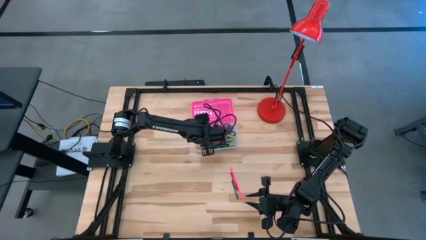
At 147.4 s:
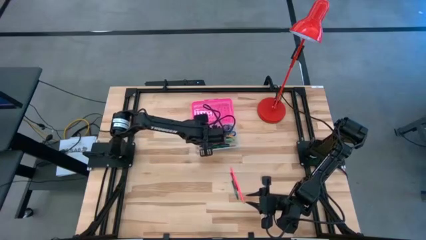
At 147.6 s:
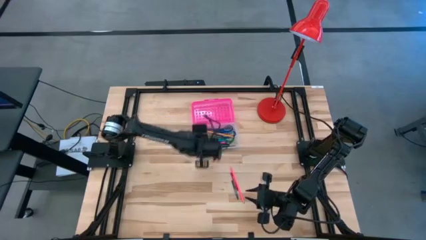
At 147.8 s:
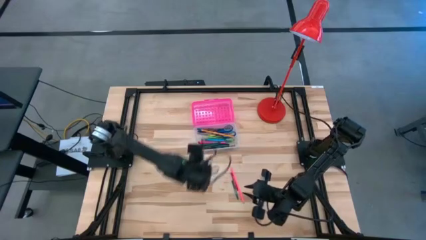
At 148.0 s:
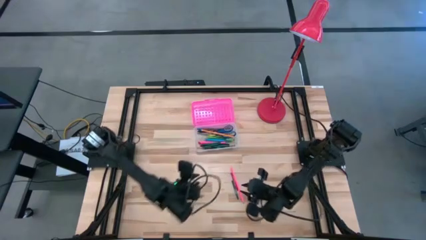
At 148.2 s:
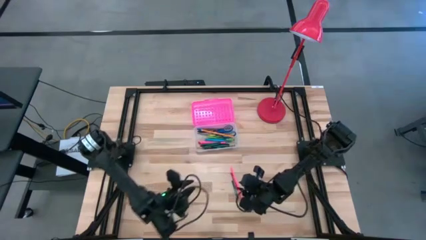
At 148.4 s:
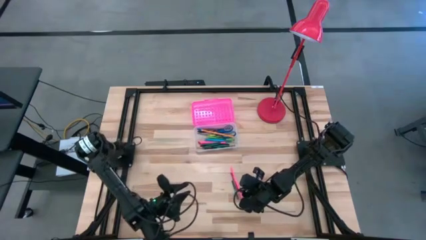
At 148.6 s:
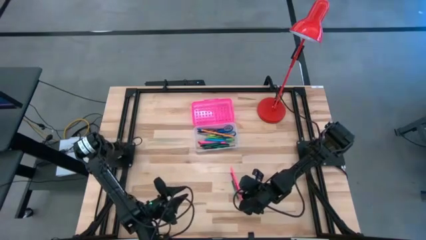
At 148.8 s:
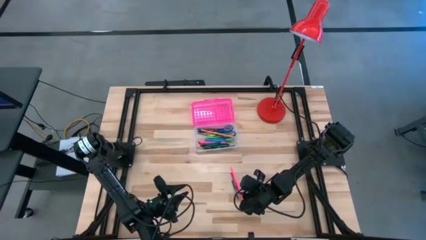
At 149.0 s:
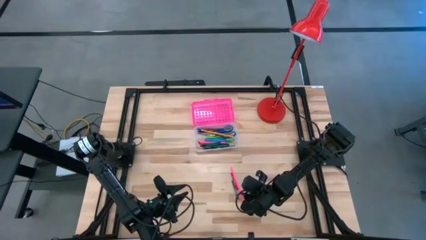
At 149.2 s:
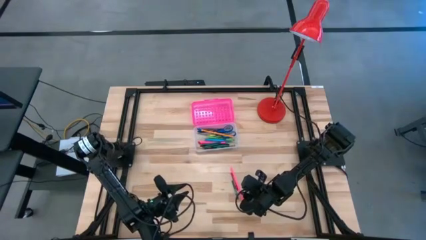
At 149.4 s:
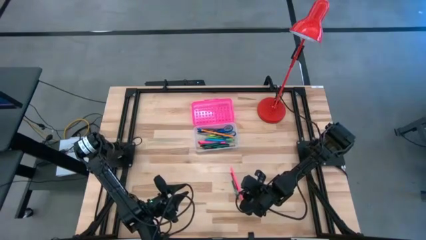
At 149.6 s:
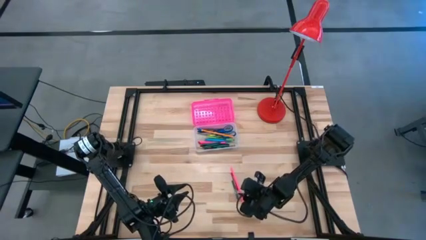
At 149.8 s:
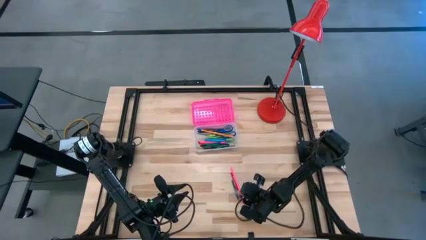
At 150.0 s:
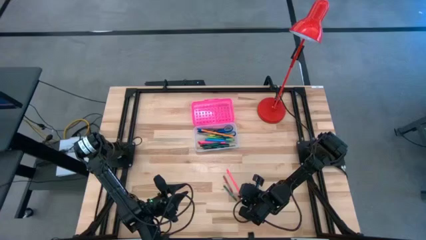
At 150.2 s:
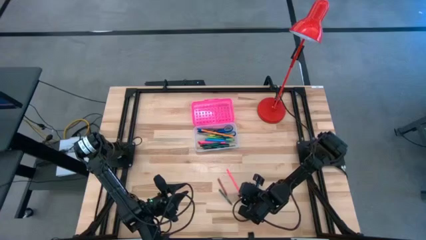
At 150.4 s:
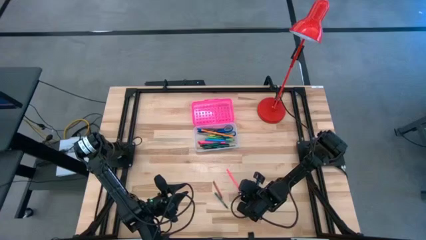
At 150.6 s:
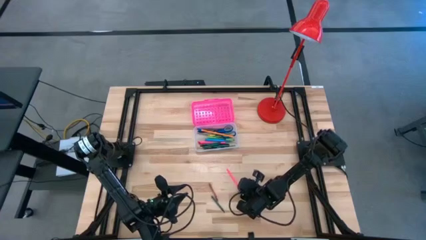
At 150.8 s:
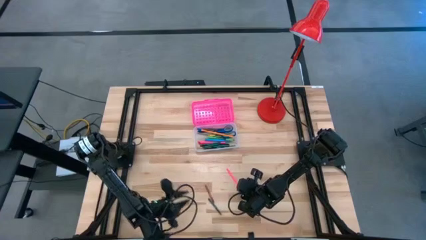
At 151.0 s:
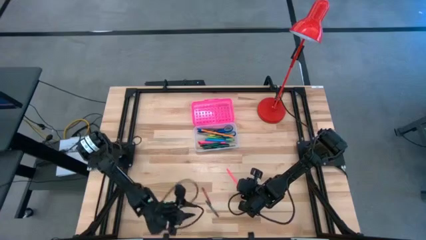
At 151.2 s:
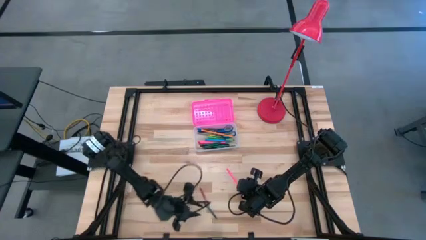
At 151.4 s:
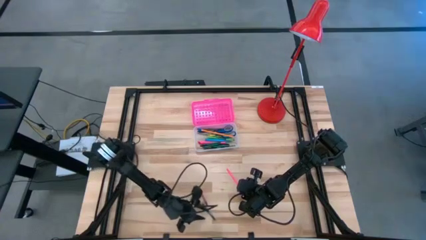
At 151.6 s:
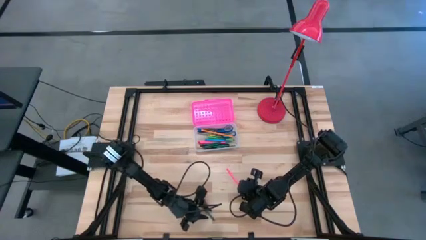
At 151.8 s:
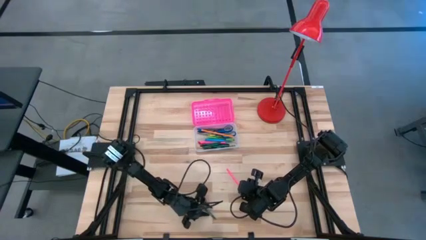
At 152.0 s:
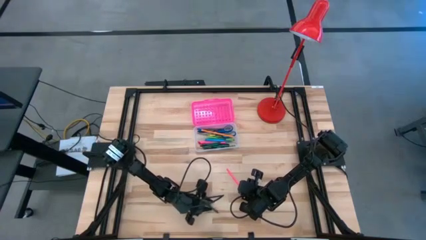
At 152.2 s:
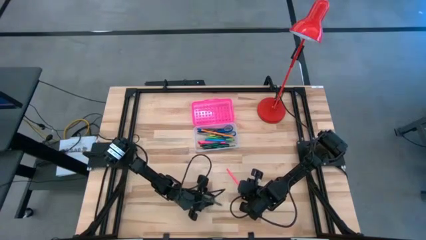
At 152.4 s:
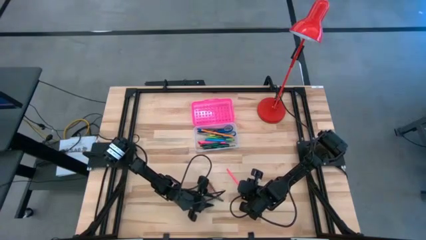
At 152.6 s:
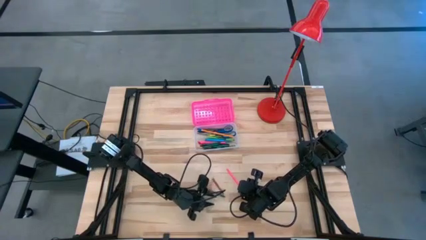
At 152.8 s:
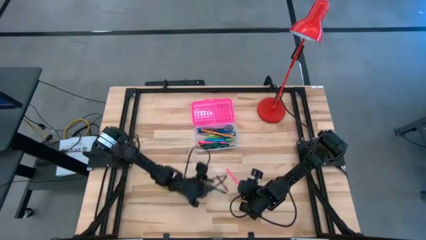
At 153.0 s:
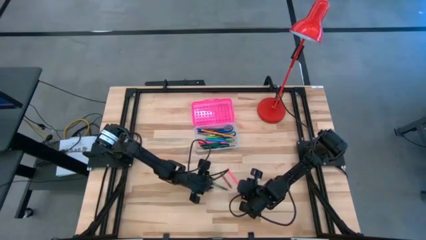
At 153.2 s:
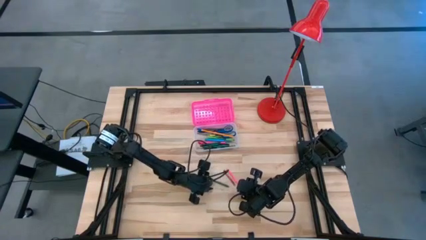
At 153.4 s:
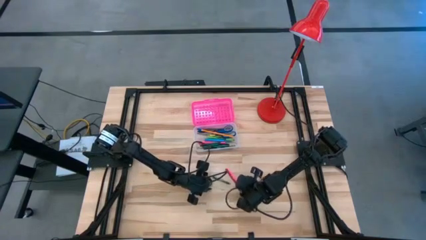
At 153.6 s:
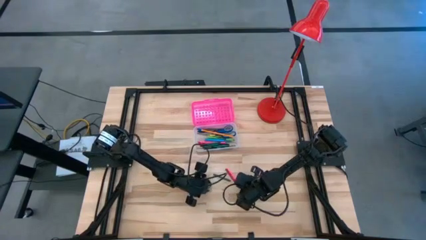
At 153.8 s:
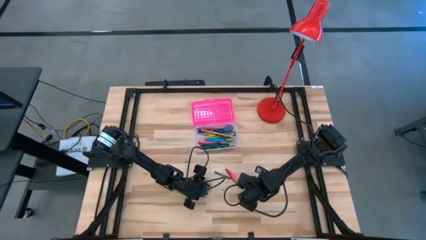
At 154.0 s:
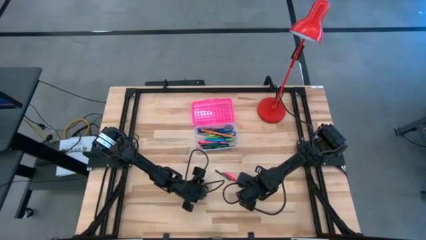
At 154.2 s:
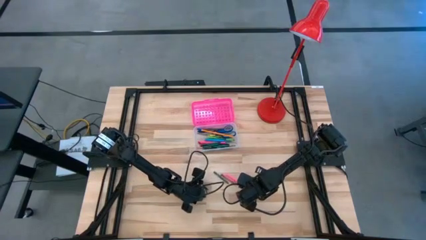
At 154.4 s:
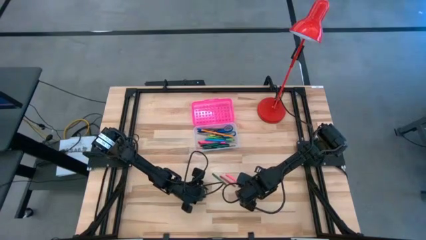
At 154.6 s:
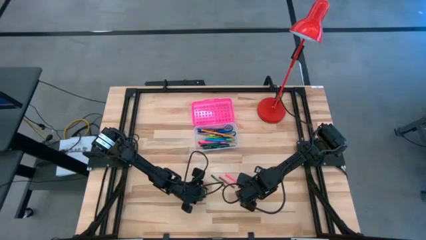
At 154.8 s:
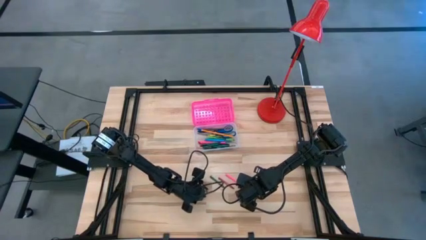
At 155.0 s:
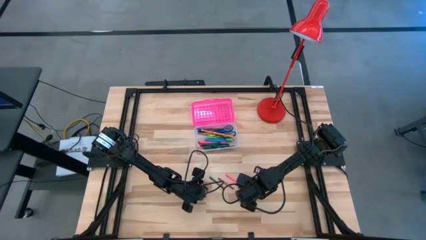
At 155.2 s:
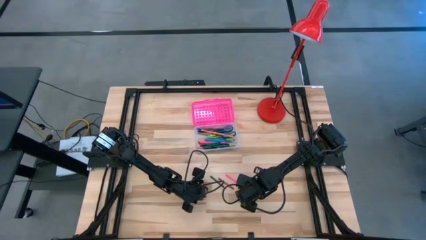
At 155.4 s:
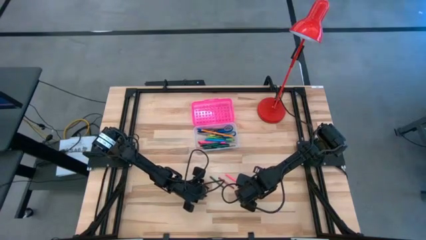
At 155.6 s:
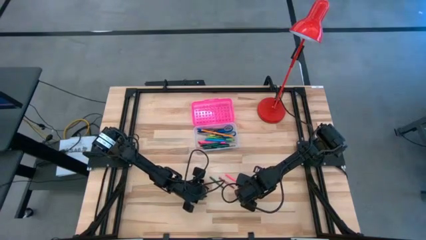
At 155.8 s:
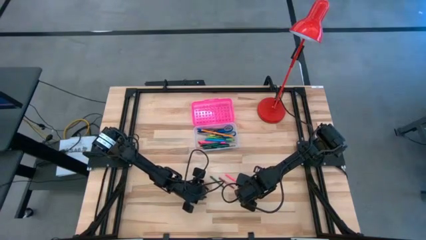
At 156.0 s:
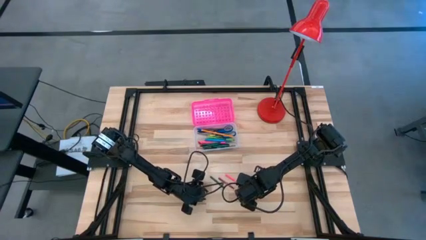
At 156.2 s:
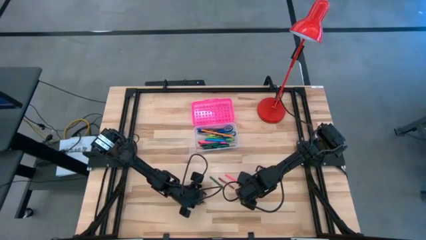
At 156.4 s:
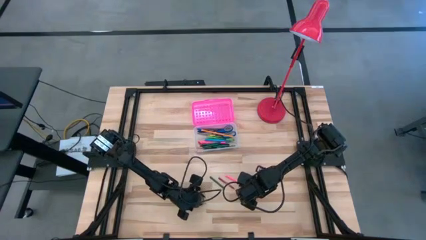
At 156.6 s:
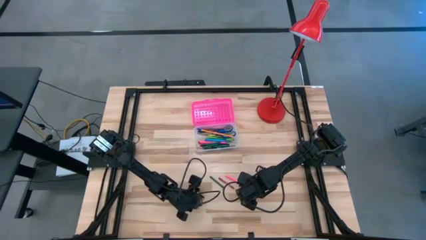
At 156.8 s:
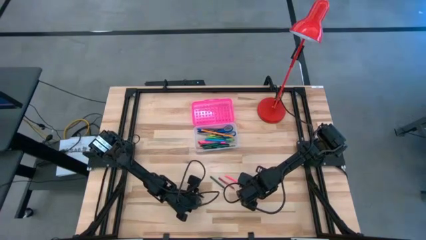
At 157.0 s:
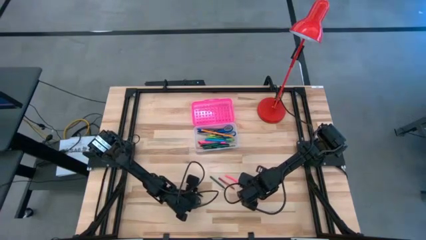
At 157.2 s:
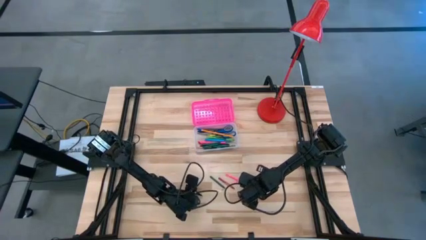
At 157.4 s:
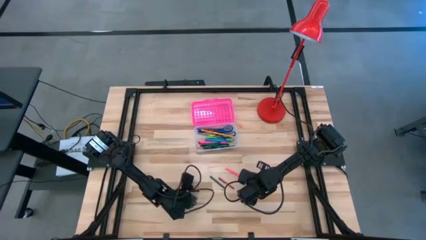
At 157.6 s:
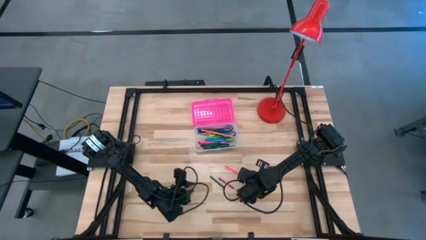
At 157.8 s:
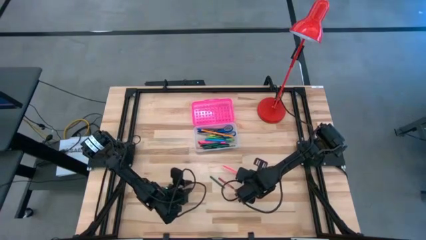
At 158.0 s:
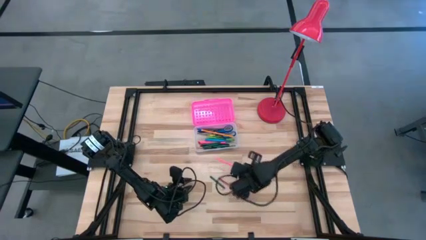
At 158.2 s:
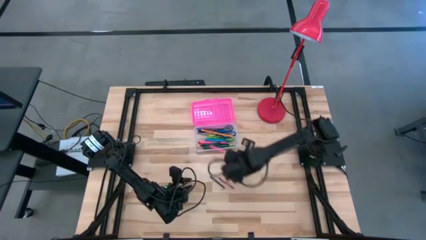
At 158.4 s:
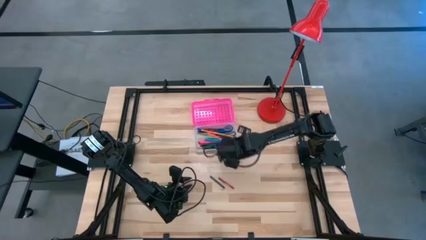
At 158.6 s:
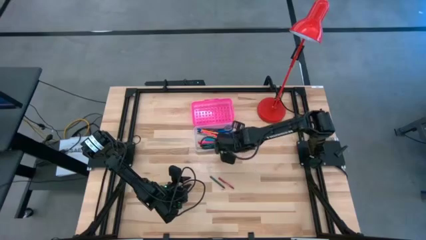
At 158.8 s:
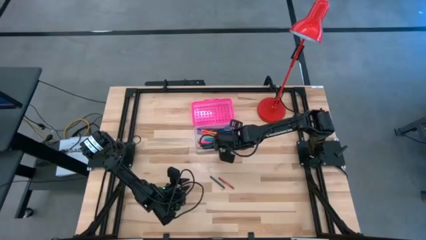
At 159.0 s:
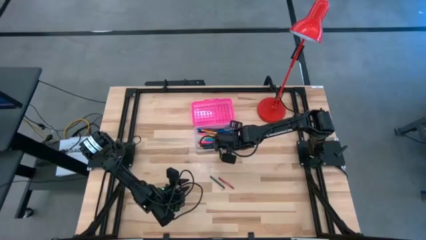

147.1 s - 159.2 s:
Task: Pick & place school supplies into a supply box
Put the pink pencil into the pink supply box
